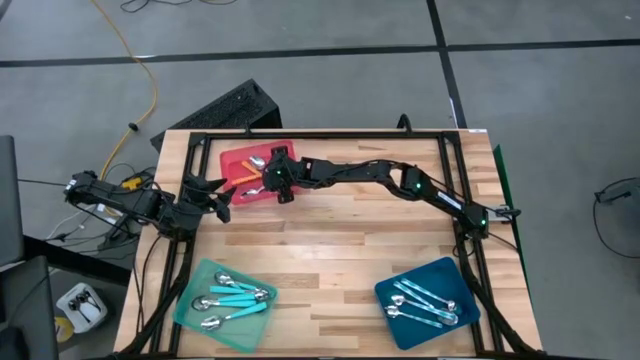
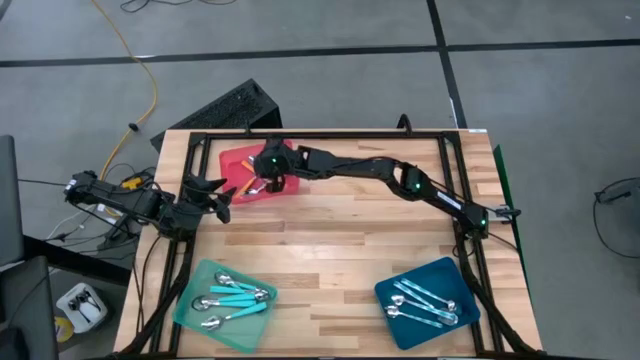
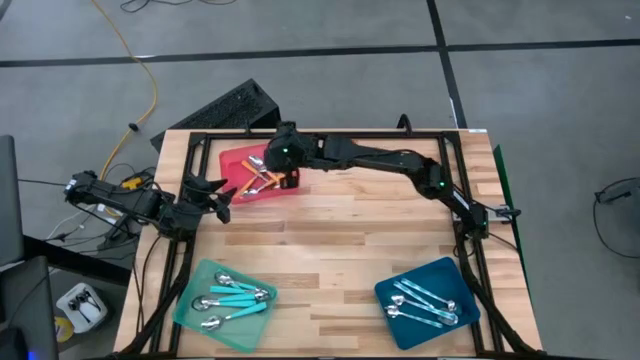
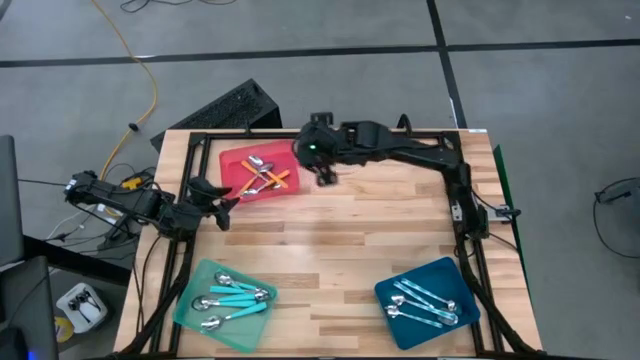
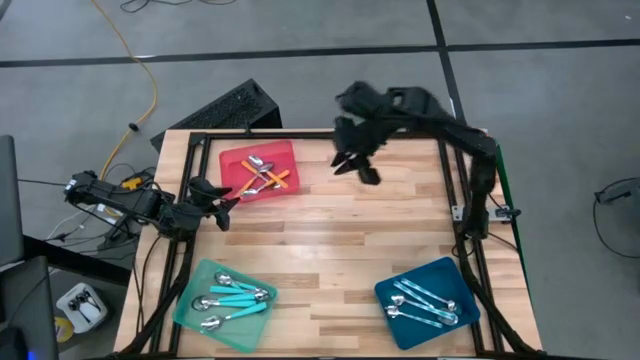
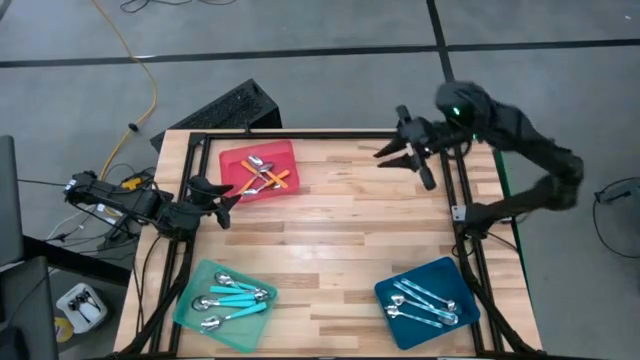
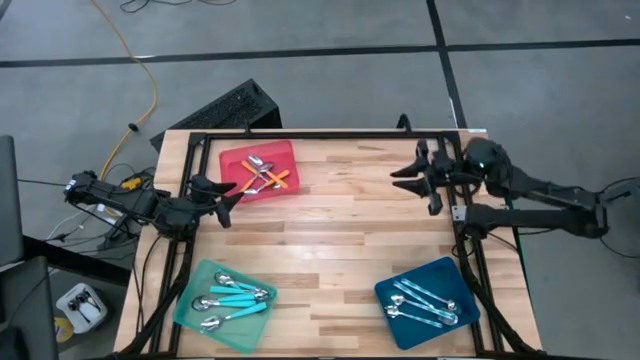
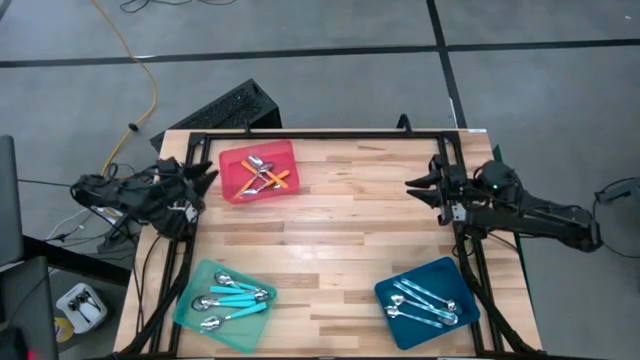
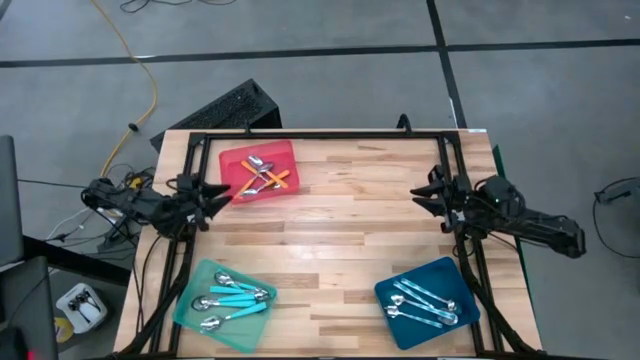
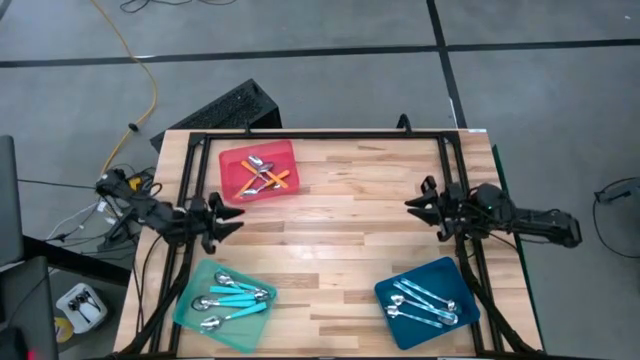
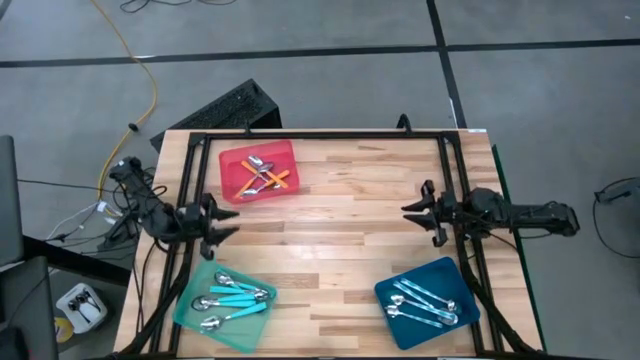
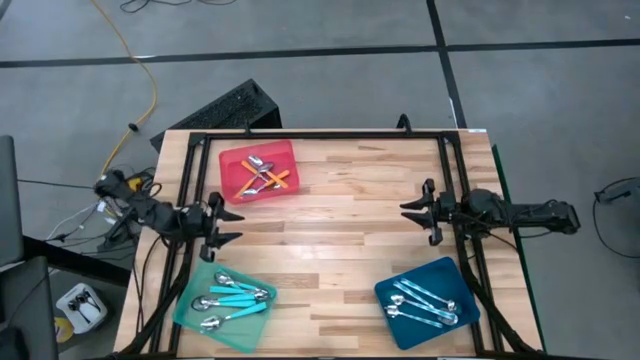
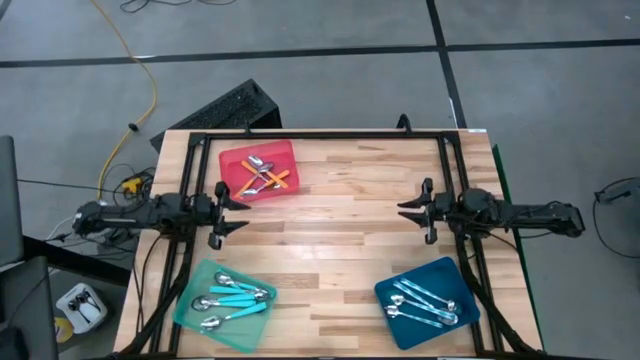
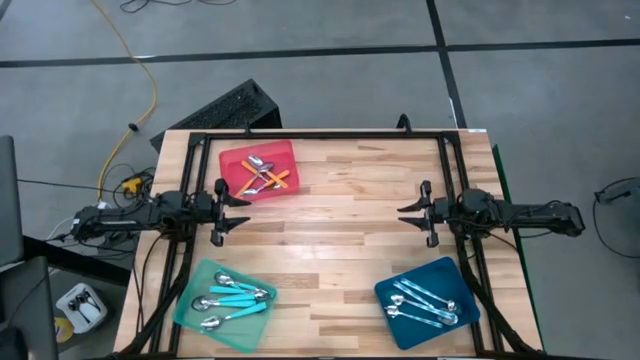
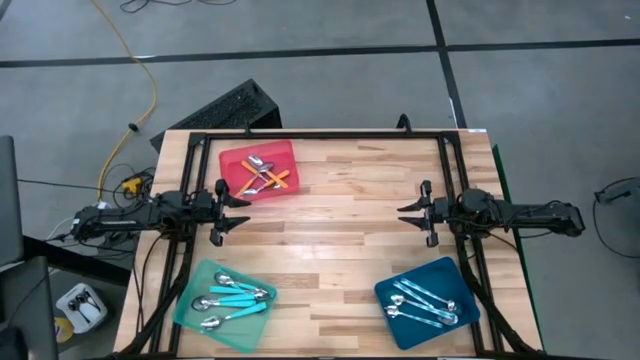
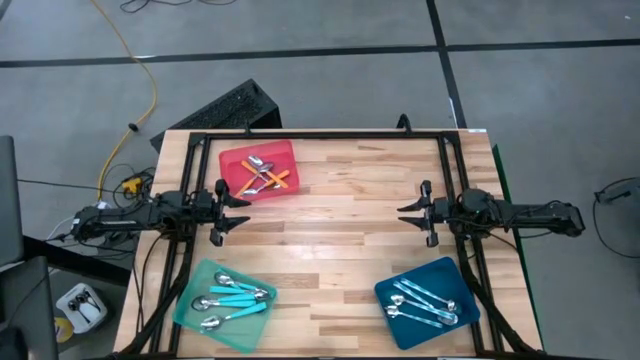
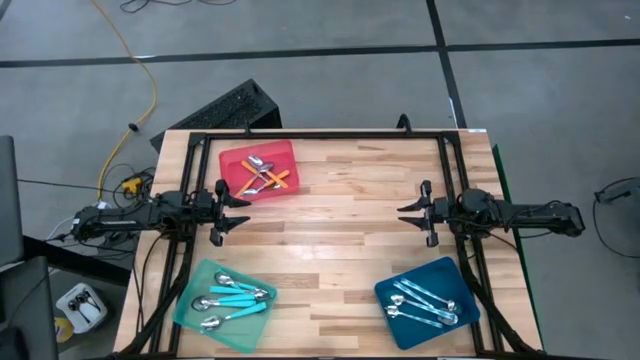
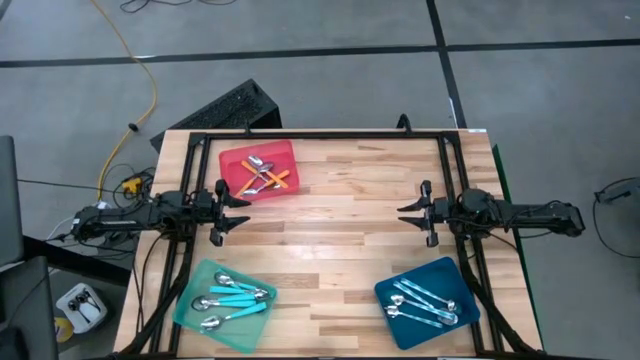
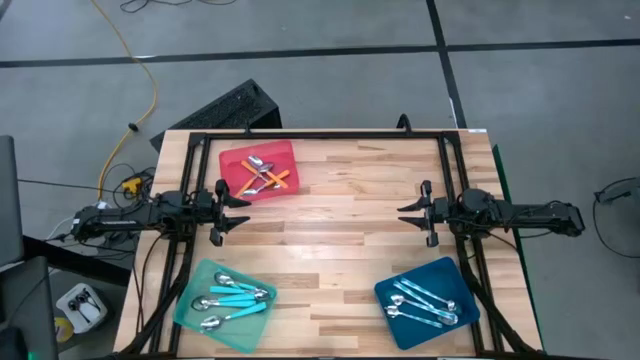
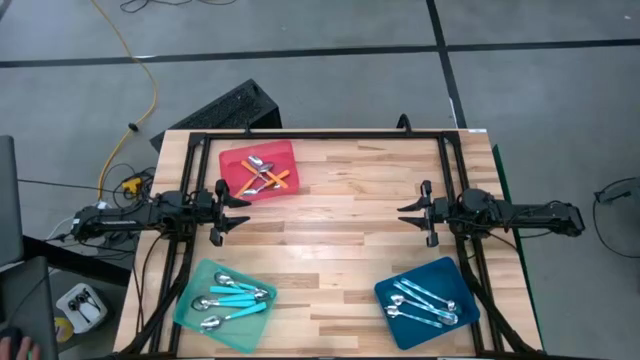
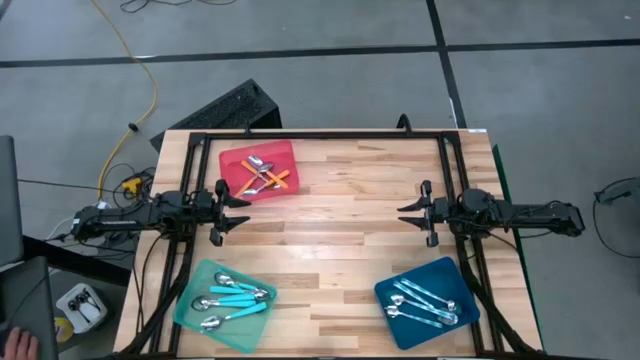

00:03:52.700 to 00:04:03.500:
Task: Sort silverware by color (type)
Return to Home Position

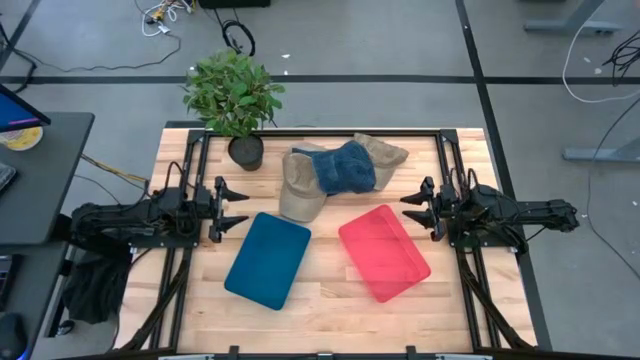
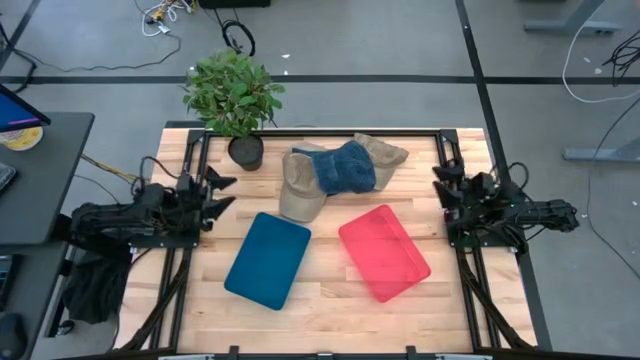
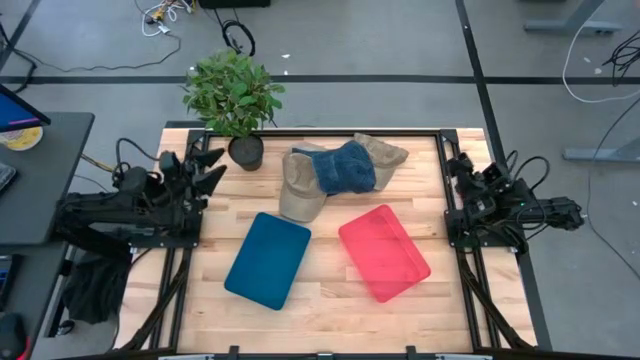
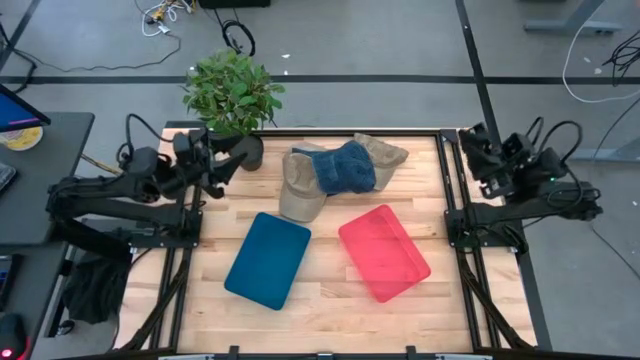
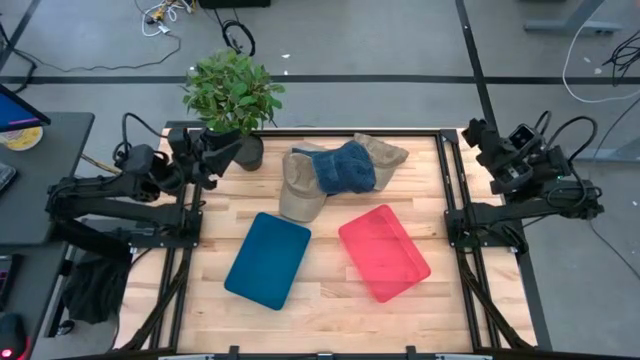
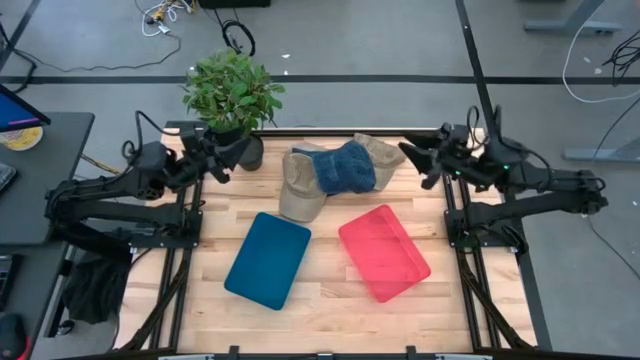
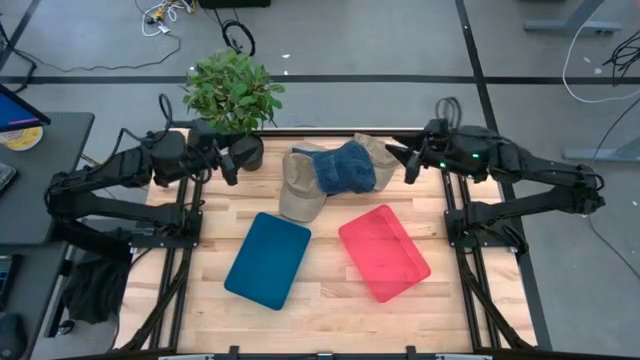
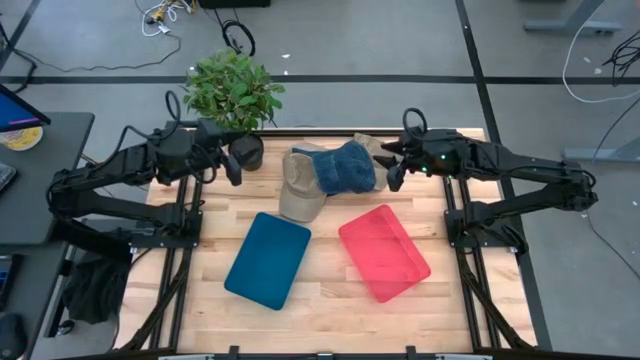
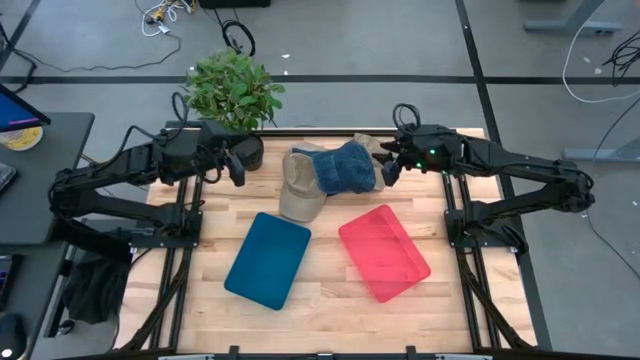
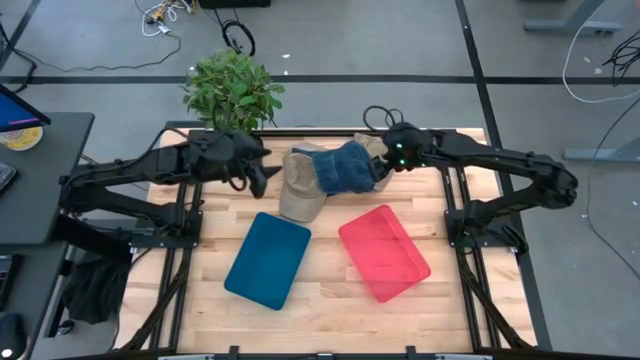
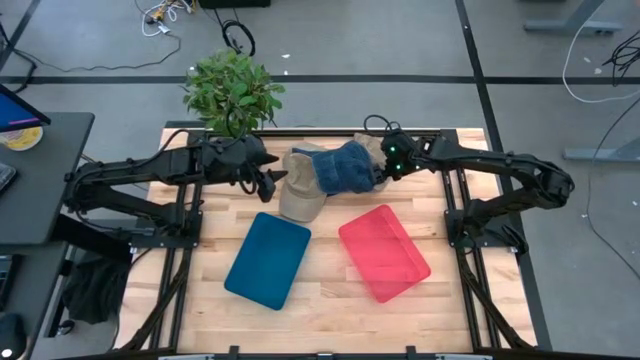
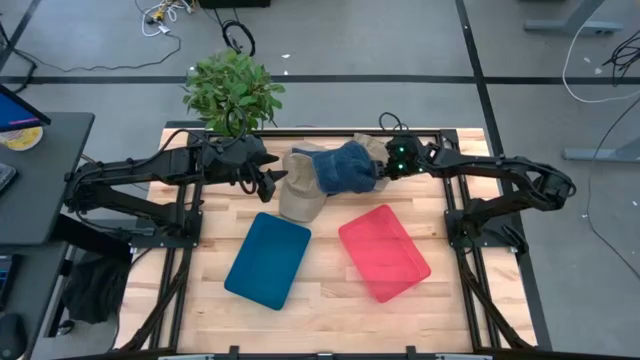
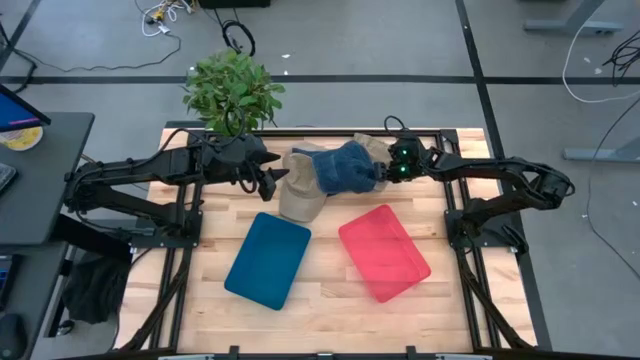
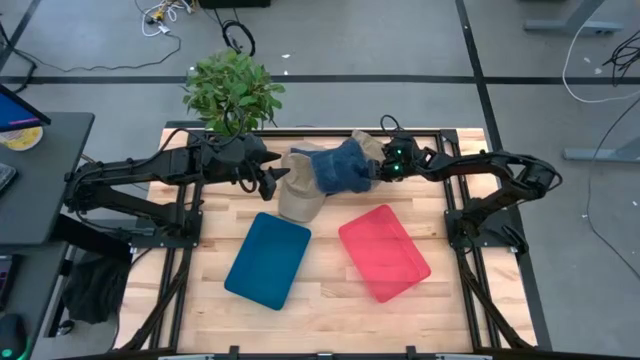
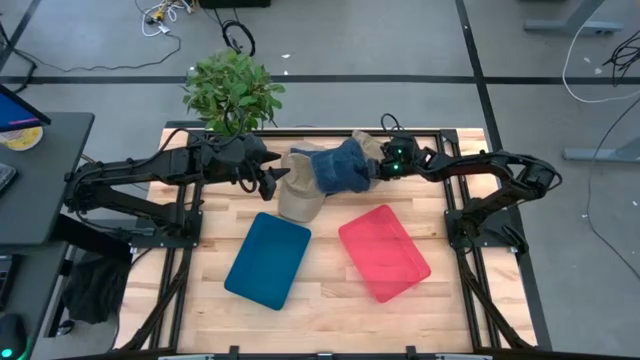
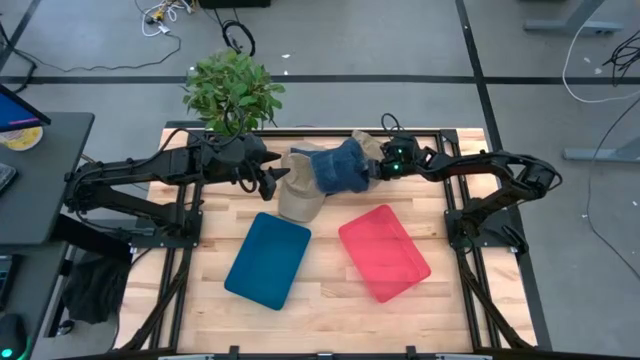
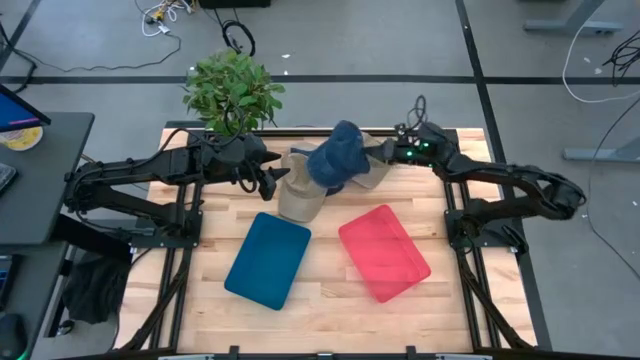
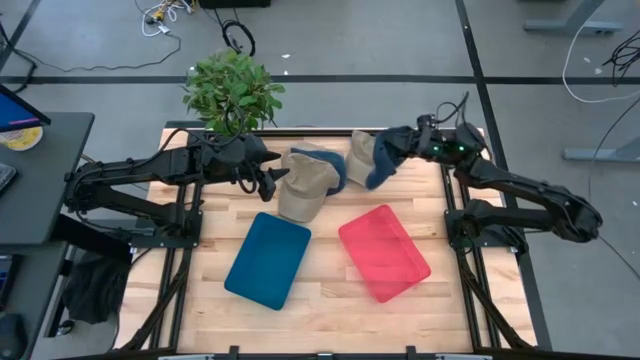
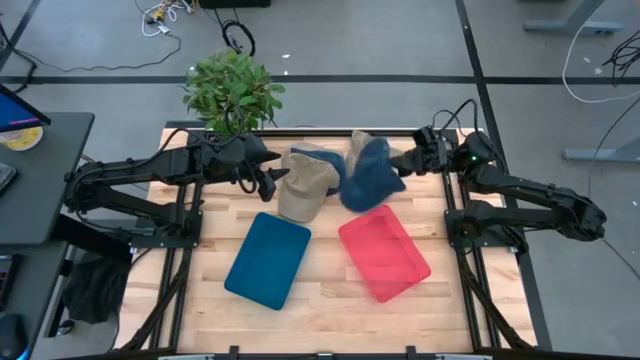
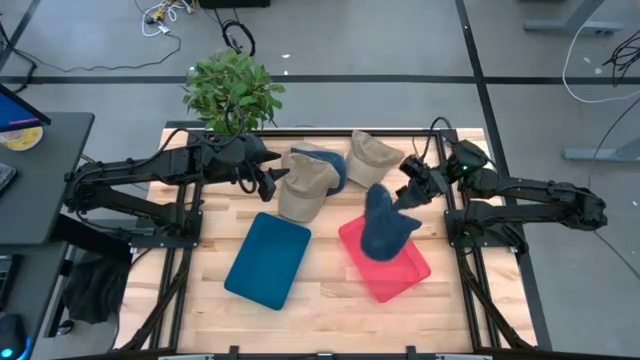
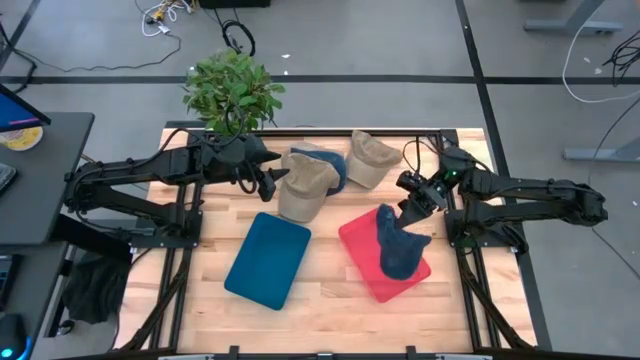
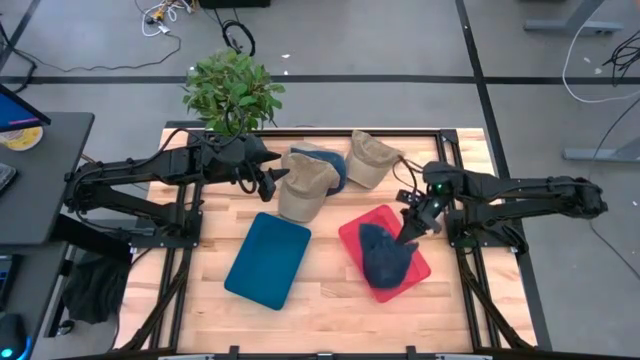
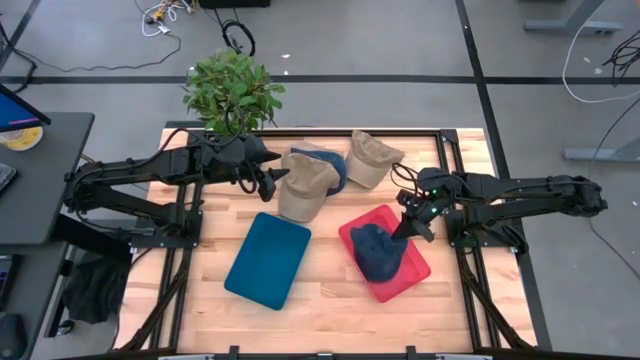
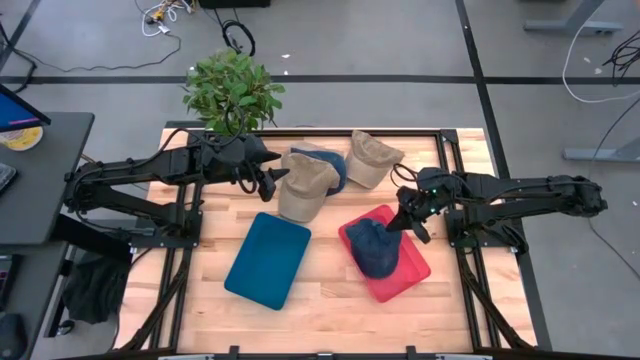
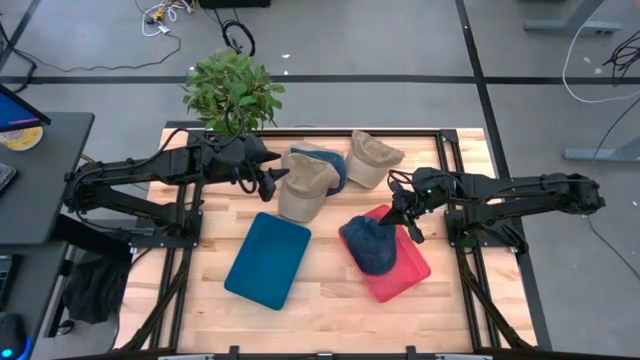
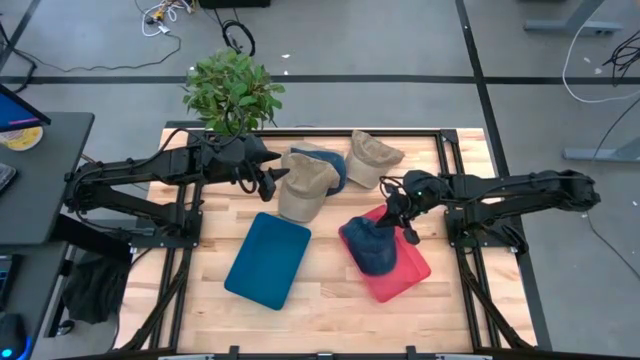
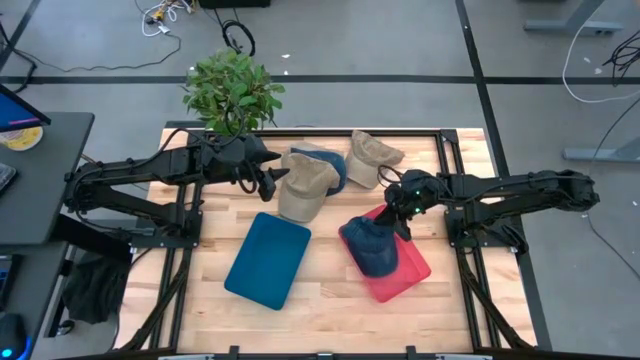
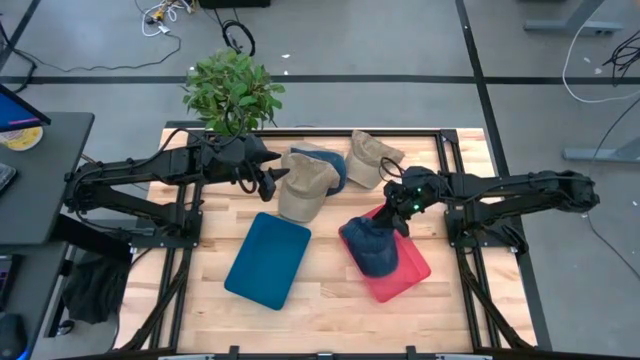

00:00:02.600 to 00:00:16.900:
Task: Pick & Place hat
Put the blue cap into the red bin
